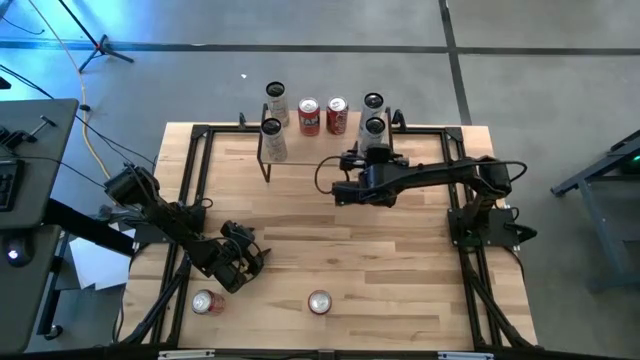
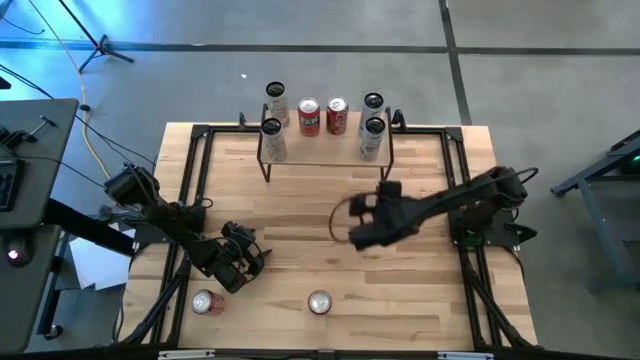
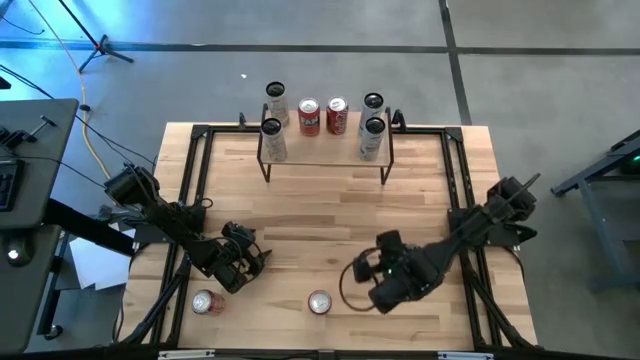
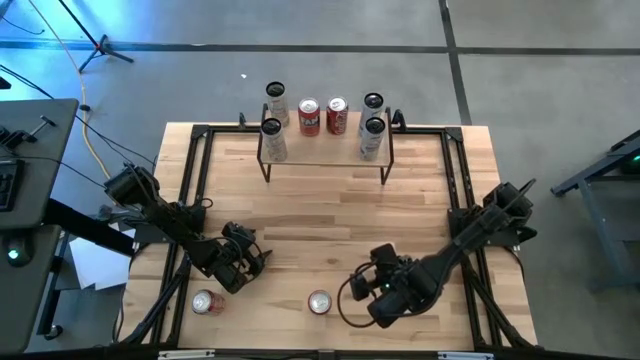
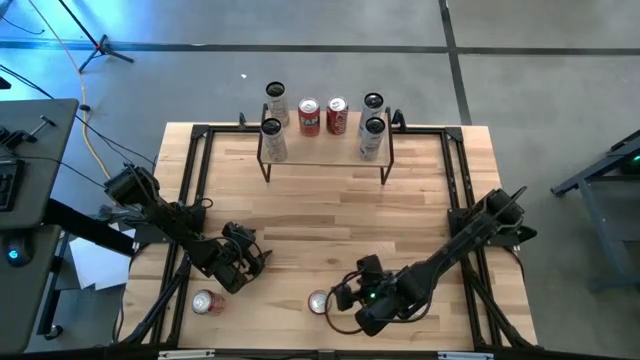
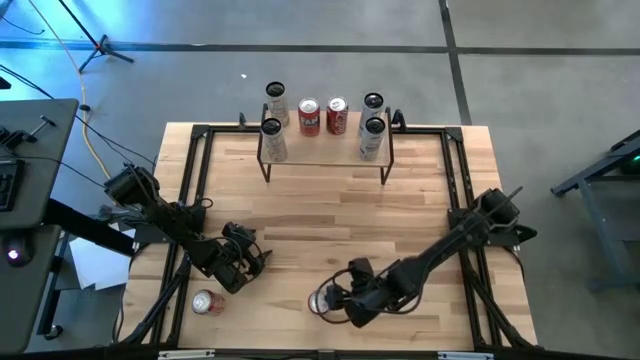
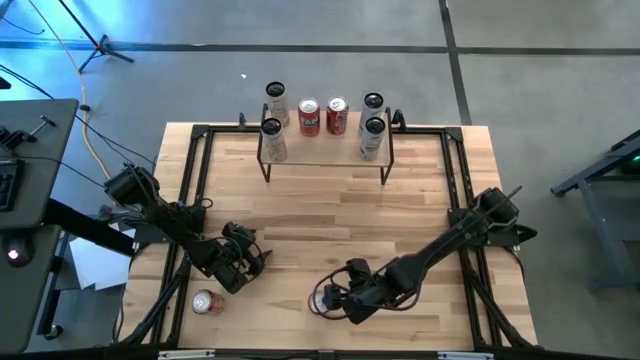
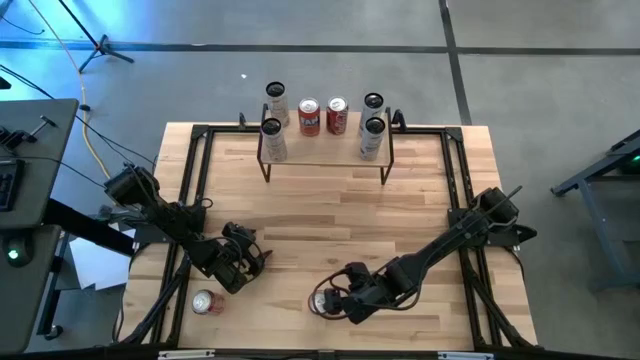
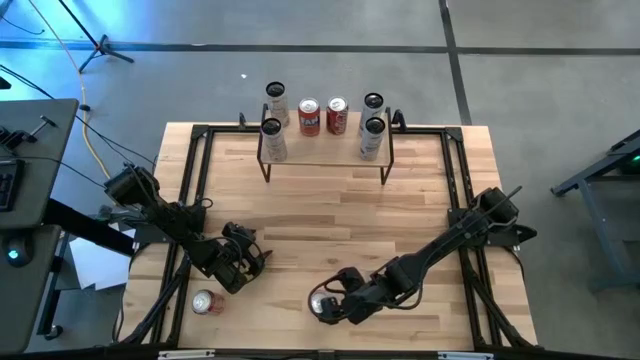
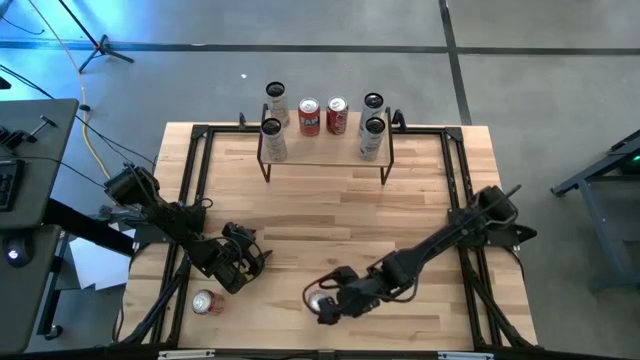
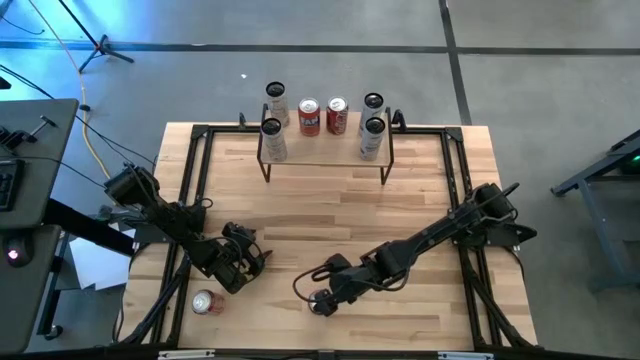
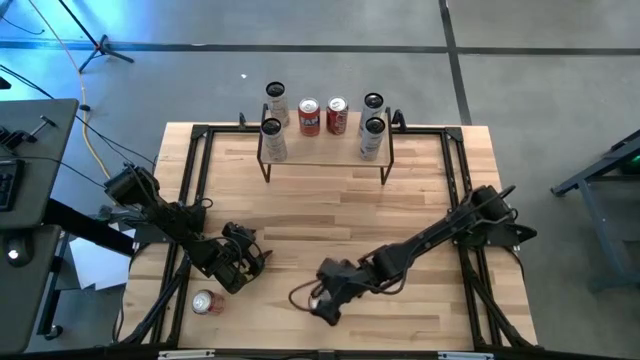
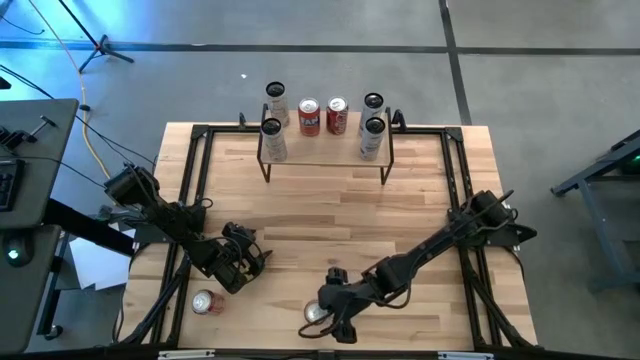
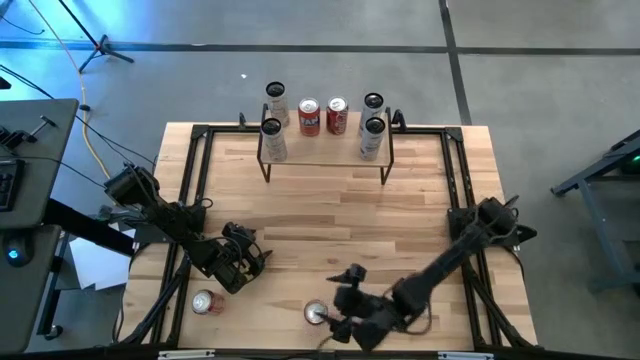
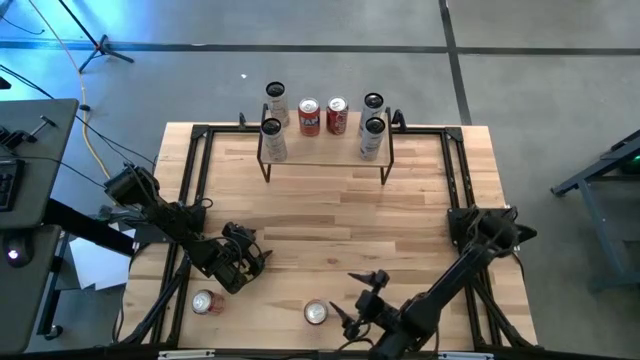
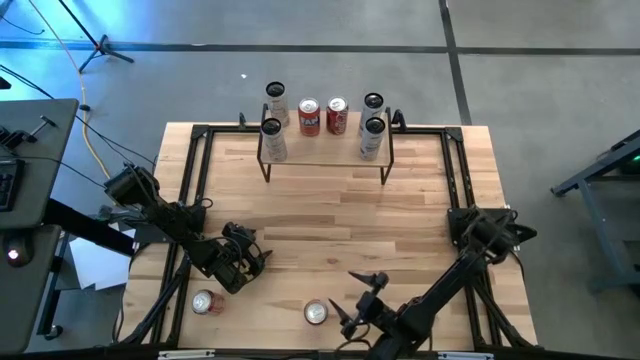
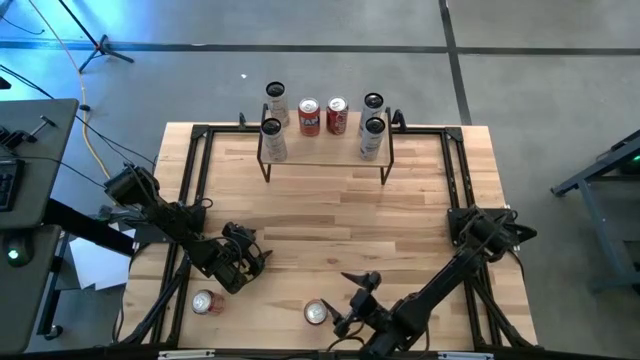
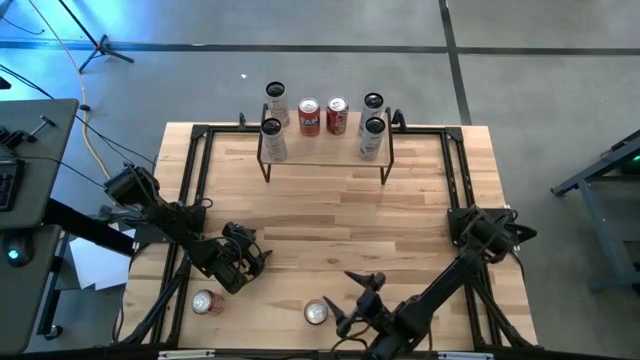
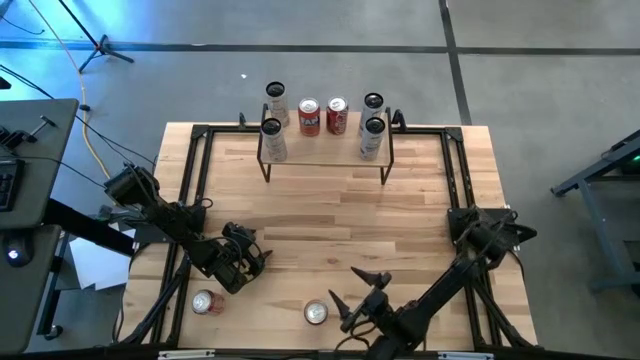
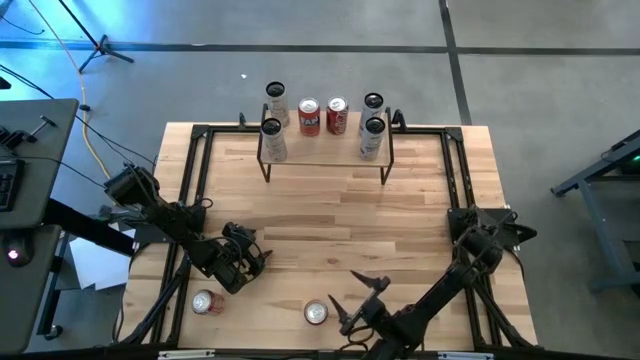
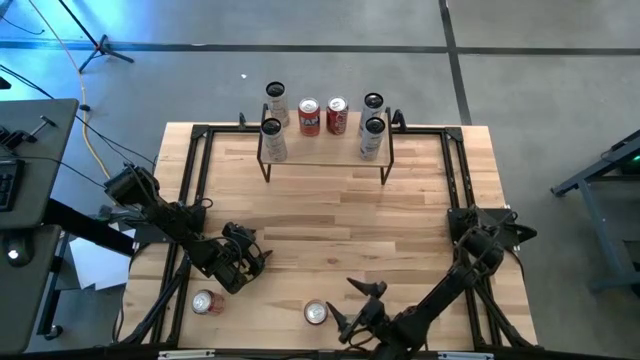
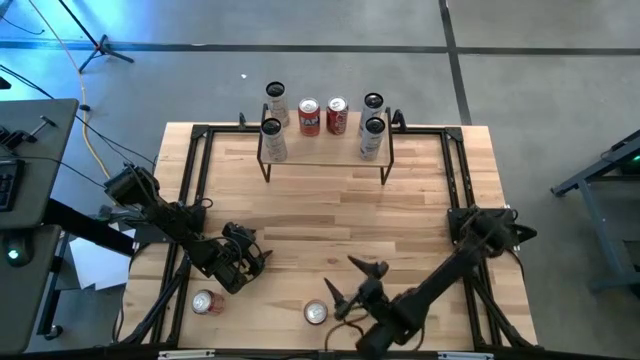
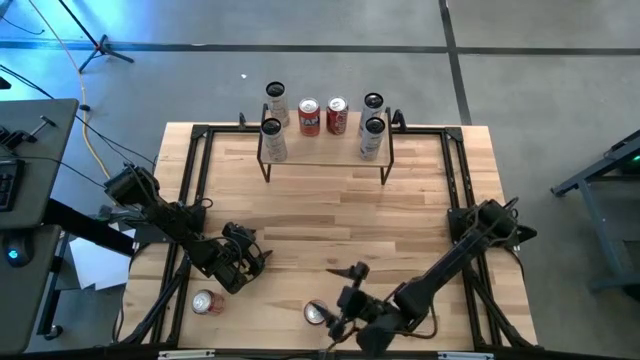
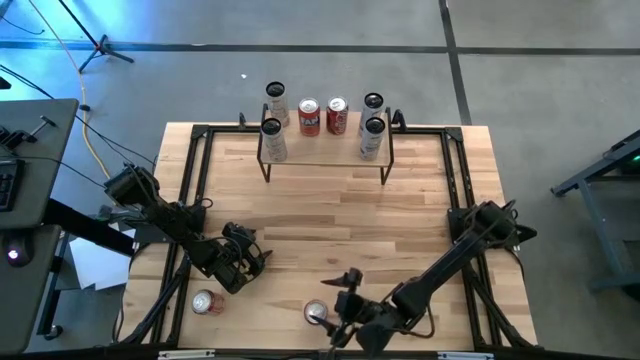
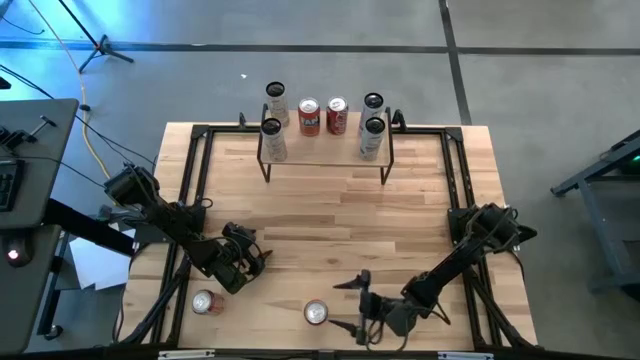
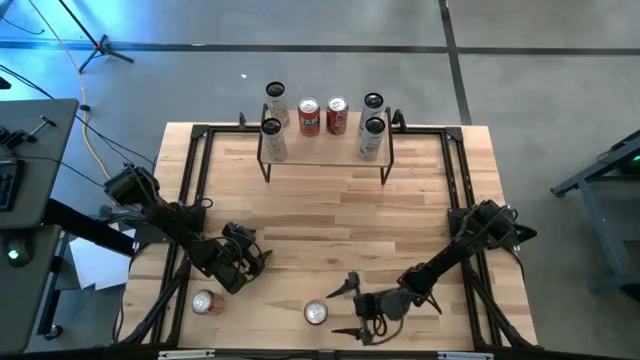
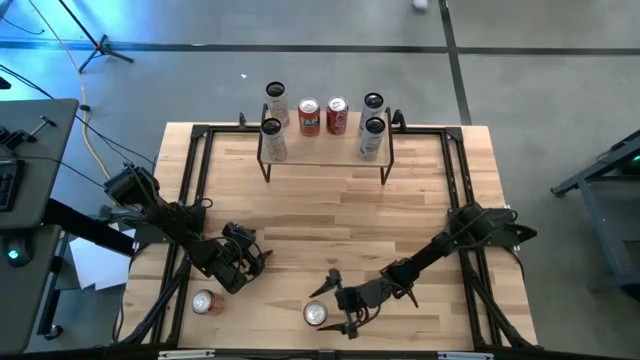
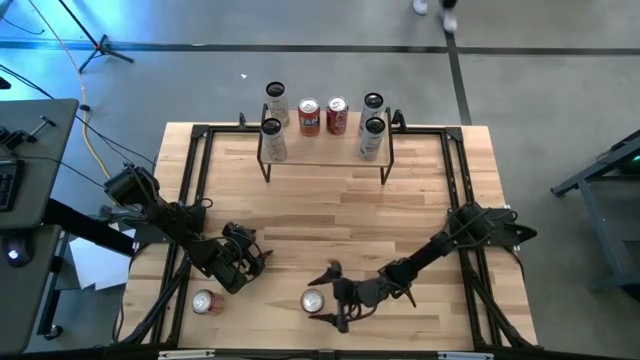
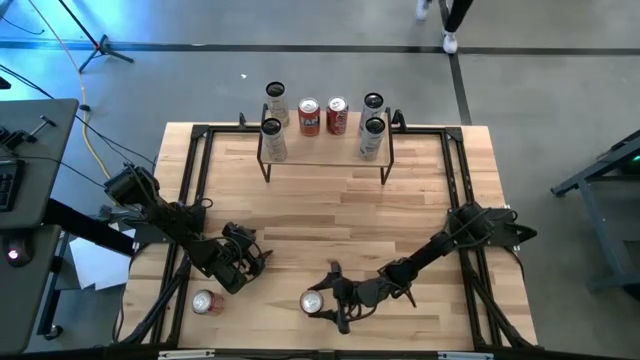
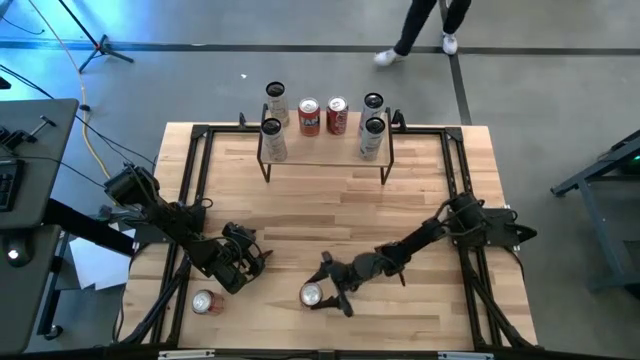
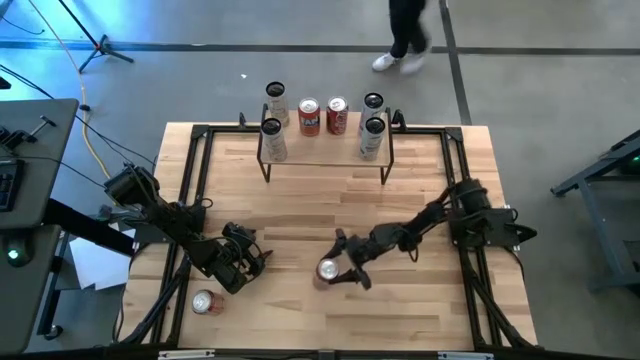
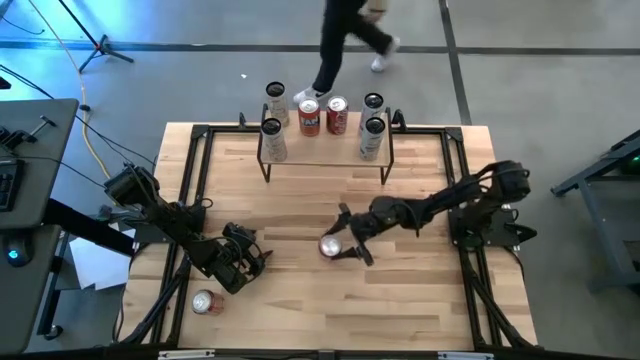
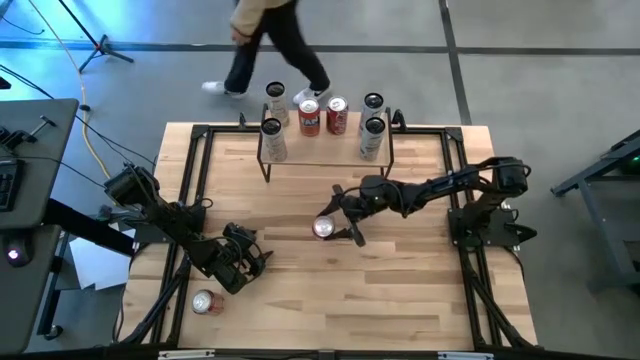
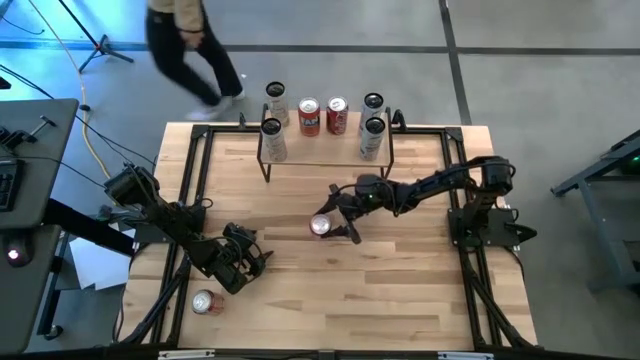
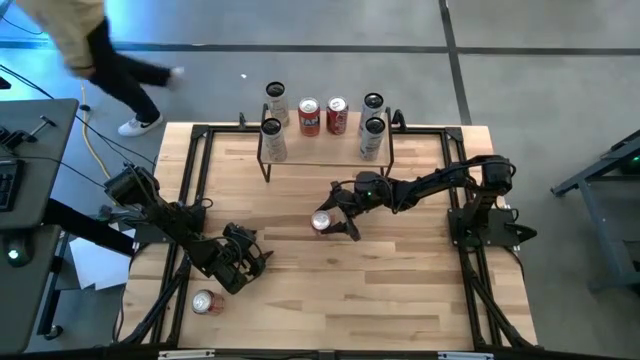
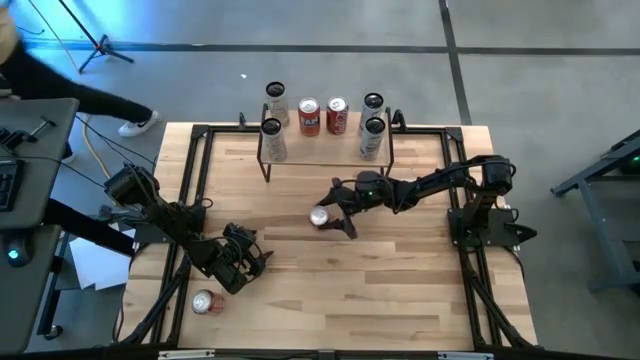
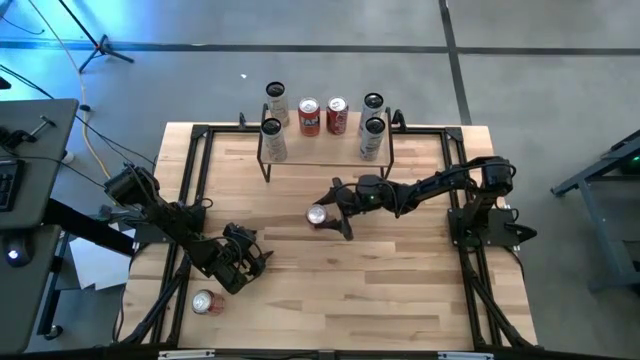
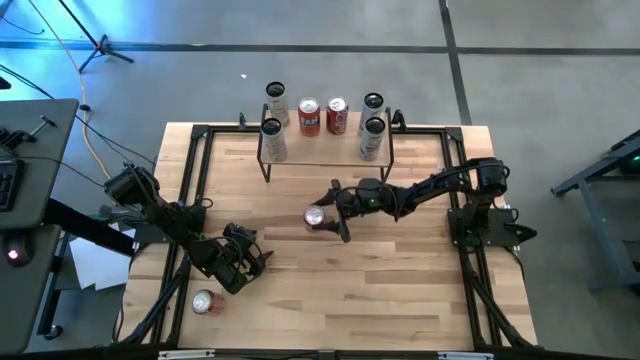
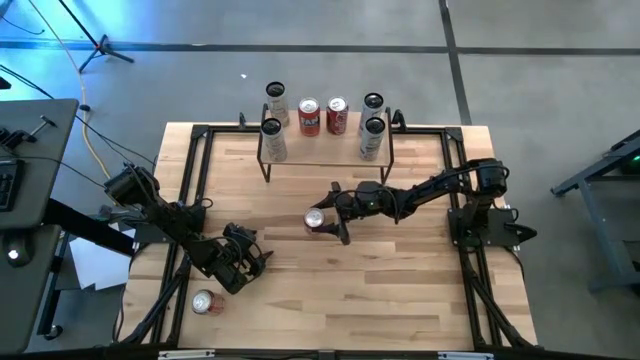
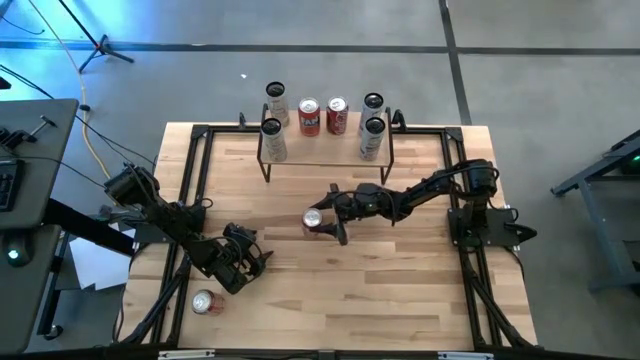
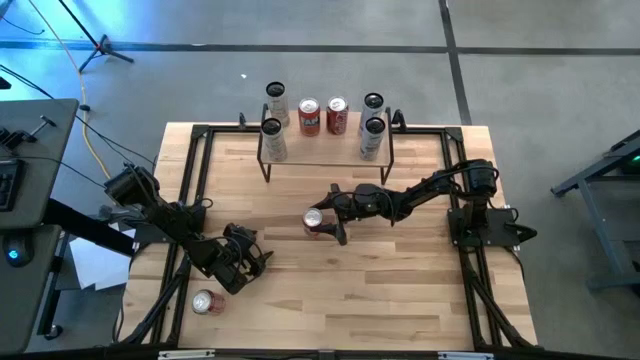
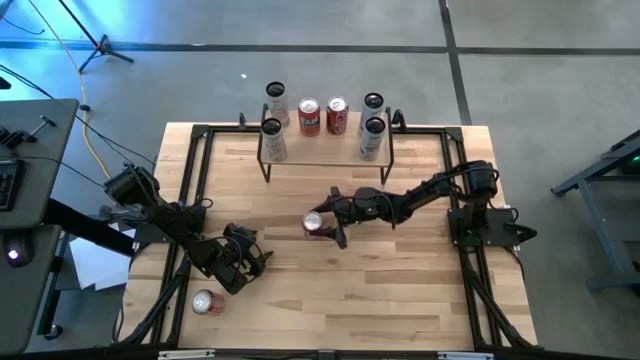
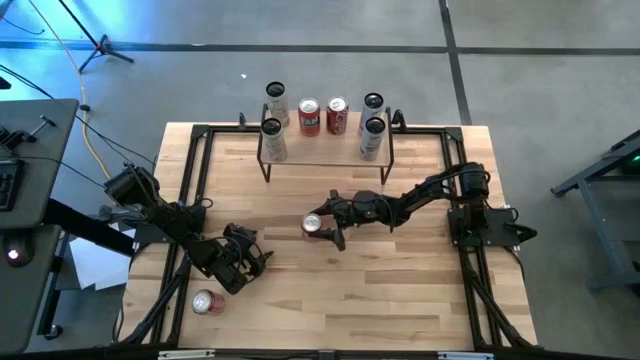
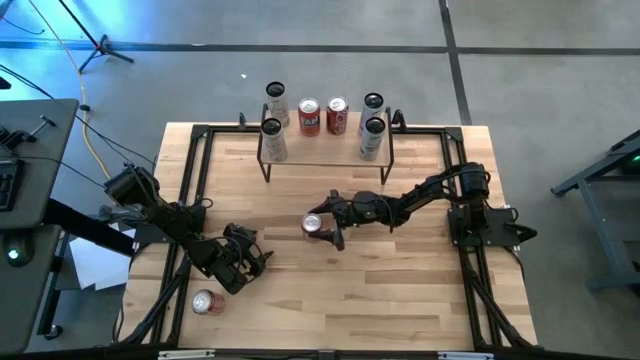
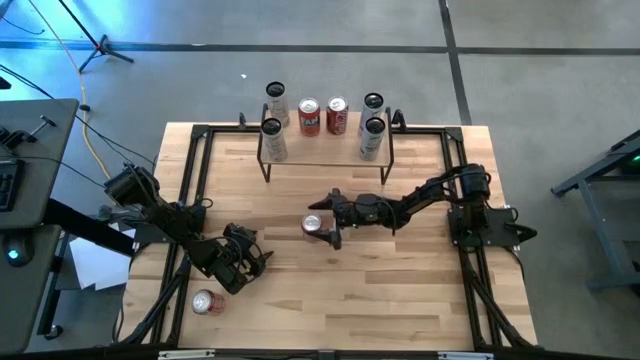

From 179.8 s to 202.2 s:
Task: Place canned beverage on shelf
Put the red soda can on the shelf aligned with the other red soda can
